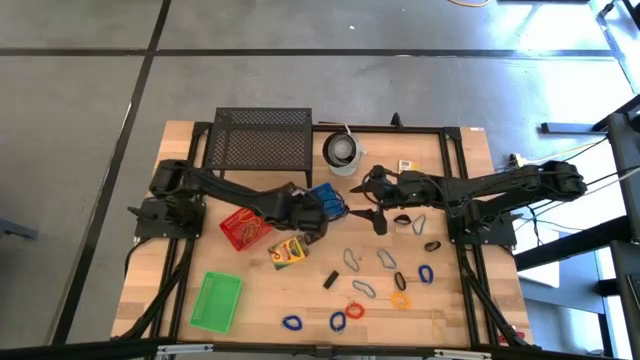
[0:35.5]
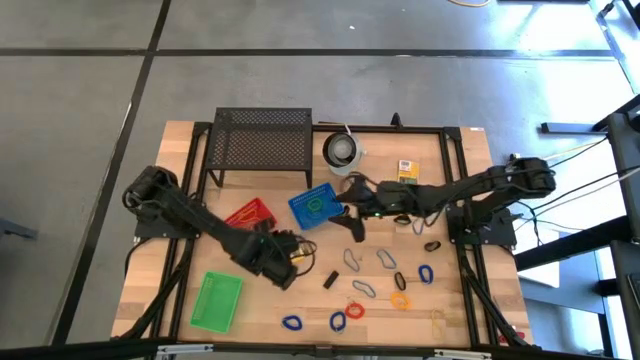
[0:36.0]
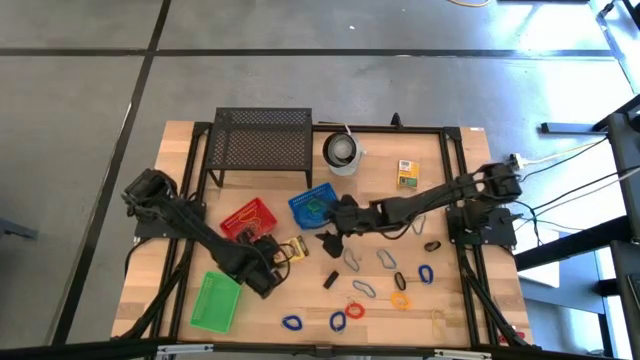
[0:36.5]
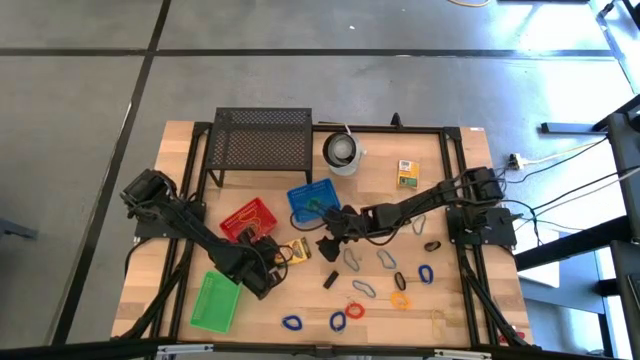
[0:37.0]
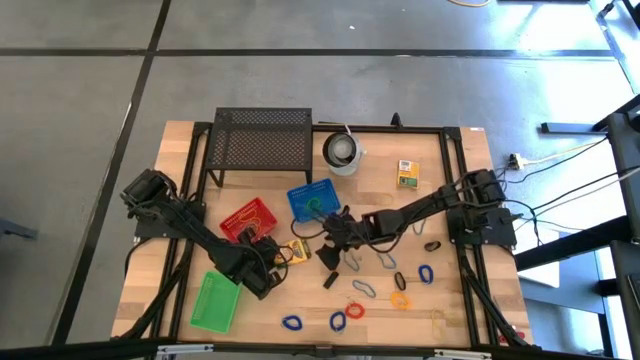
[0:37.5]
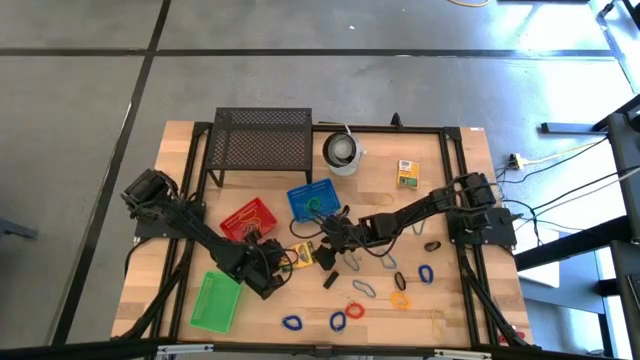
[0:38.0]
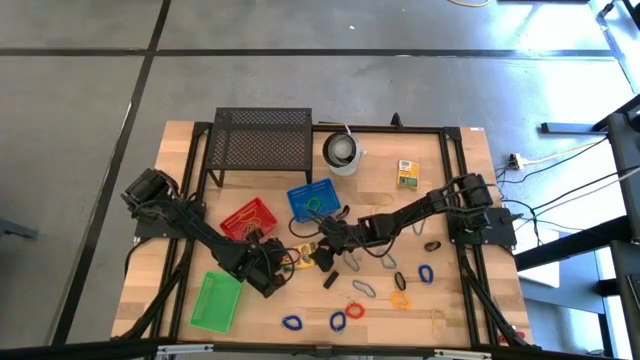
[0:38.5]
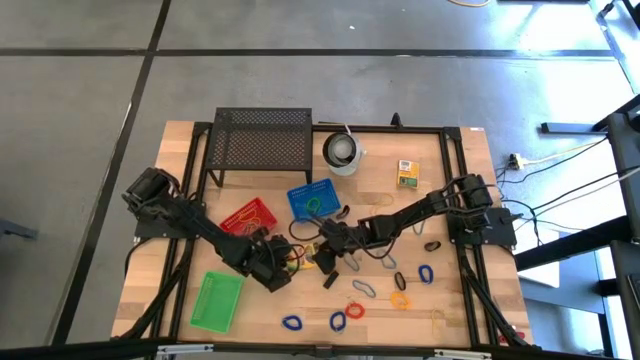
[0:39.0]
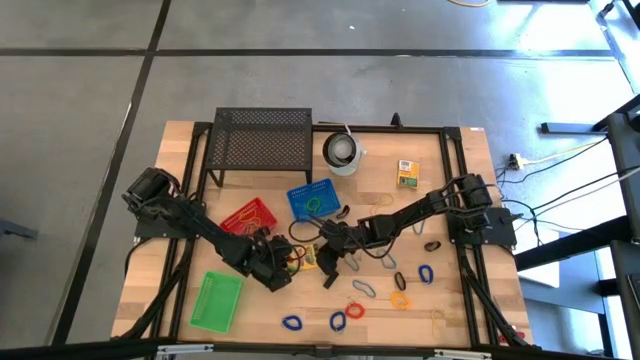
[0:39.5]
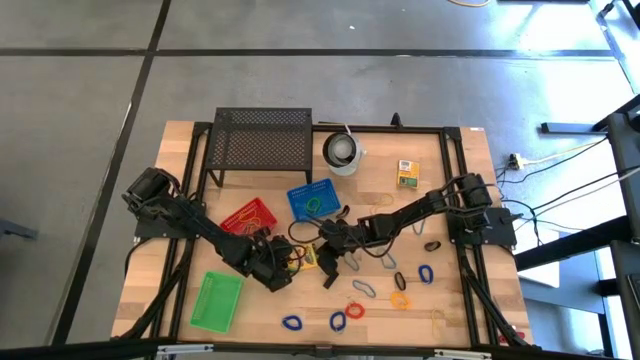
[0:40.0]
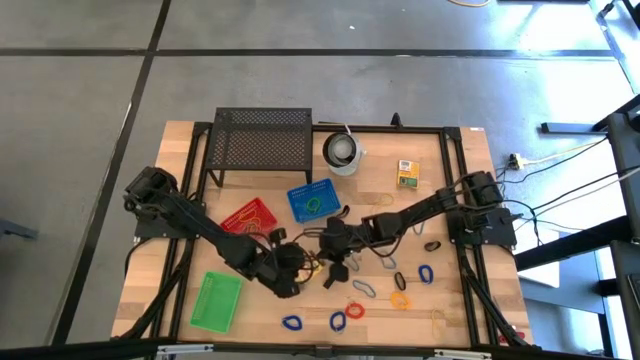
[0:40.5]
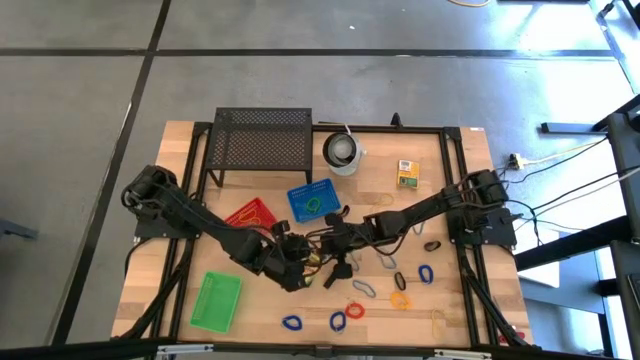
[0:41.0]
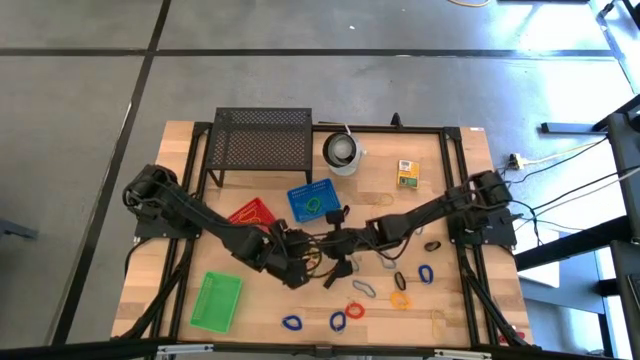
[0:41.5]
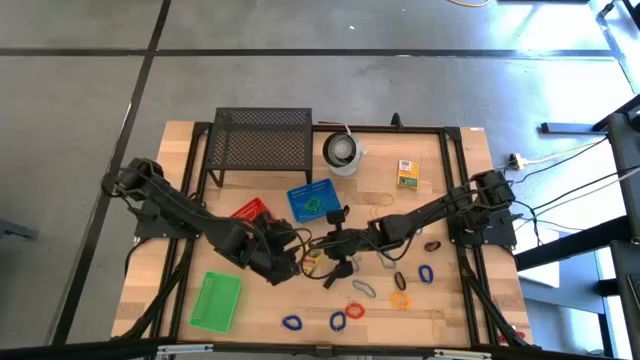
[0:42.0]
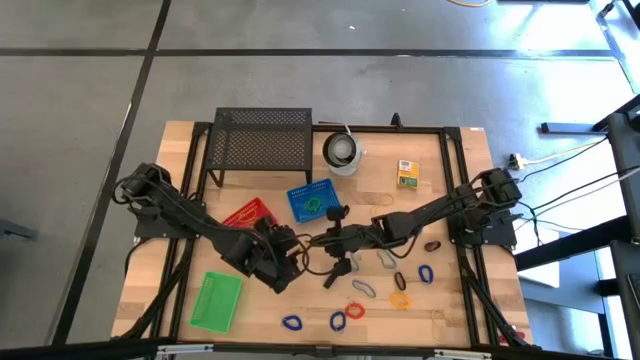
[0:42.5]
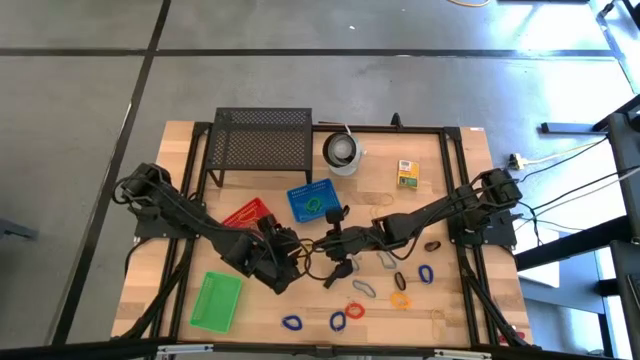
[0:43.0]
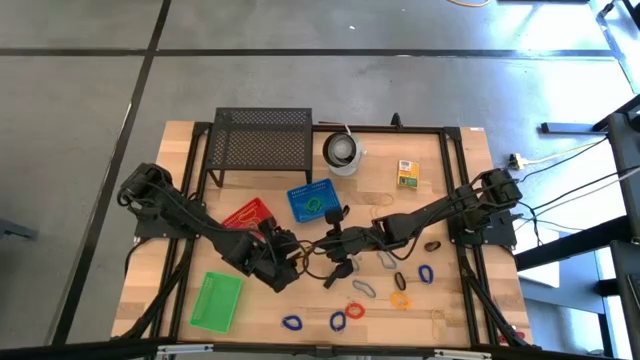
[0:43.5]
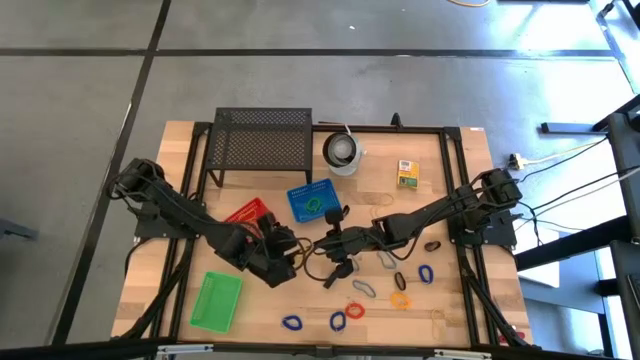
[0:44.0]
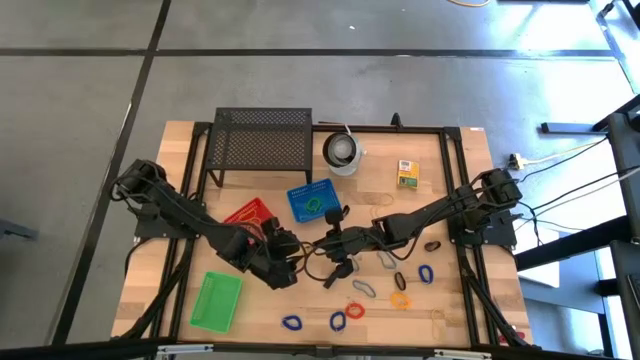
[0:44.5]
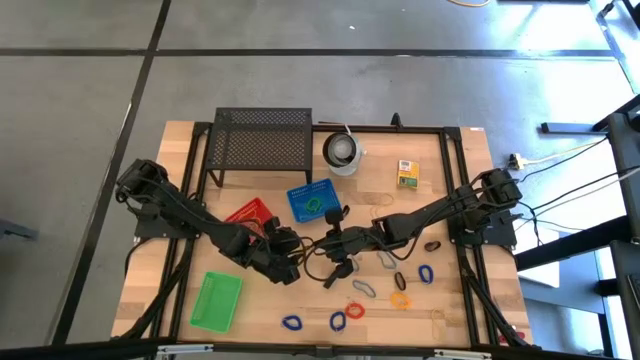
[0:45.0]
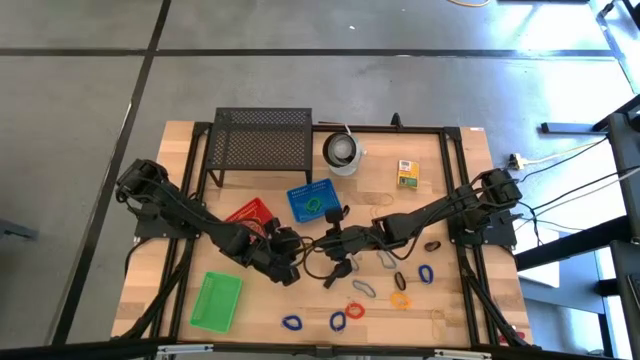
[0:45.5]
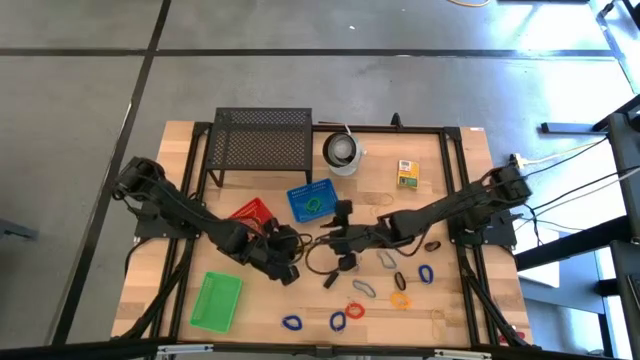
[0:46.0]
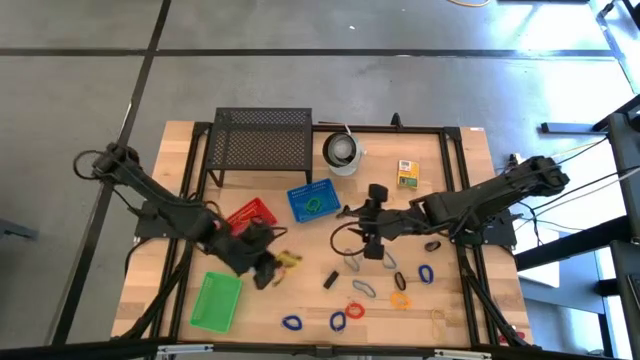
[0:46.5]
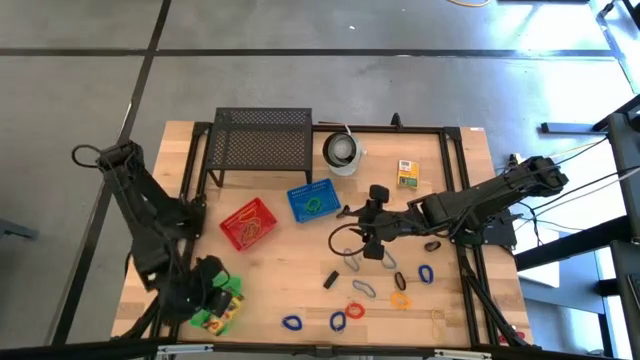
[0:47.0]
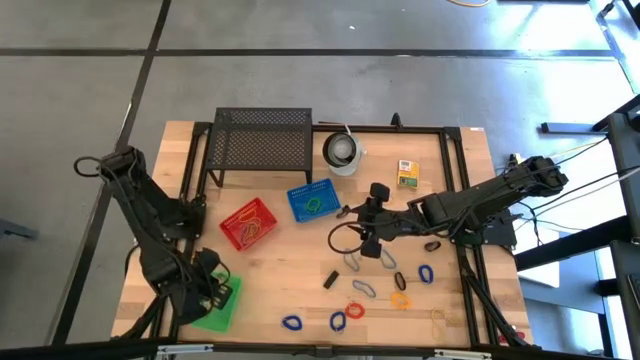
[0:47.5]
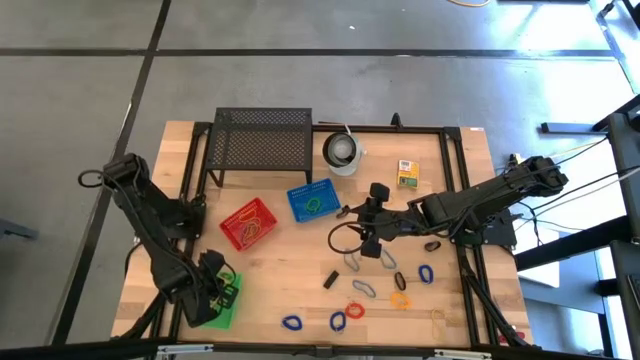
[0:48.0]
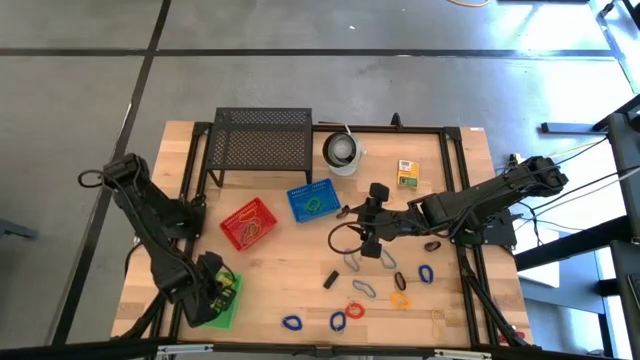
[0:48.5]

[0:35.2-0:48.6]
Task: Pick & Place Office Desk Supplies
Put the crayon box into the green bin

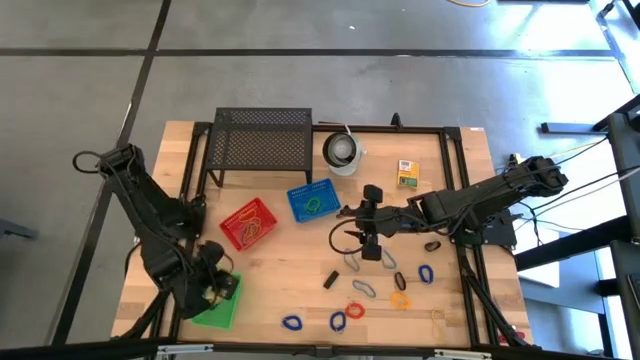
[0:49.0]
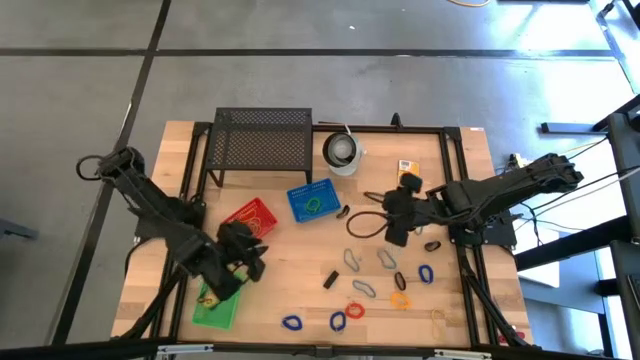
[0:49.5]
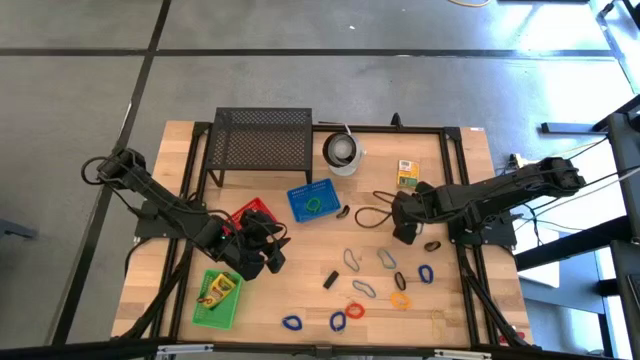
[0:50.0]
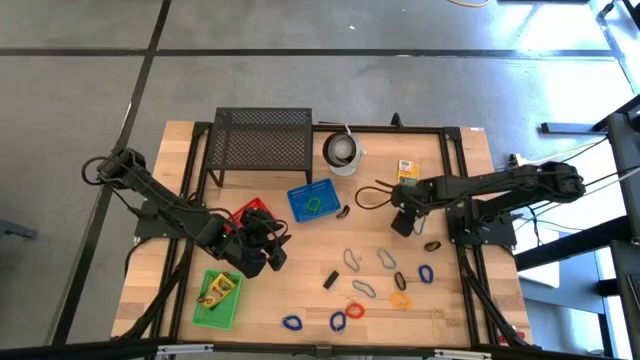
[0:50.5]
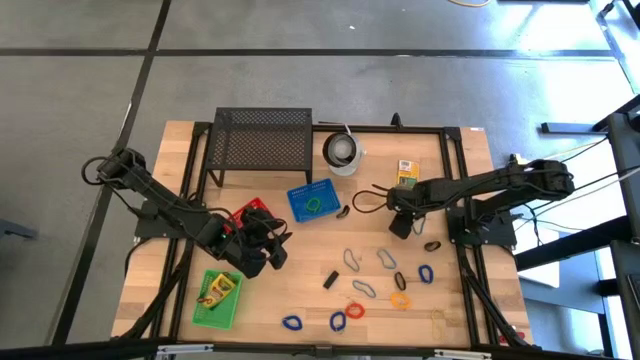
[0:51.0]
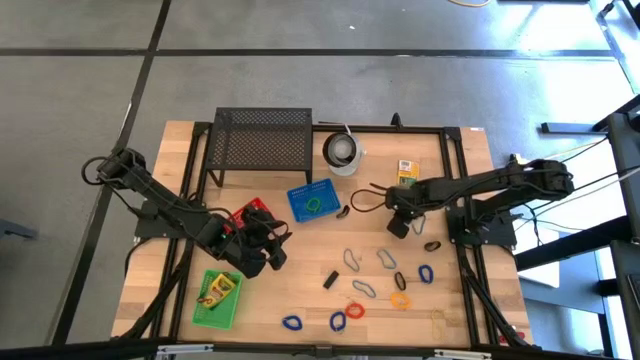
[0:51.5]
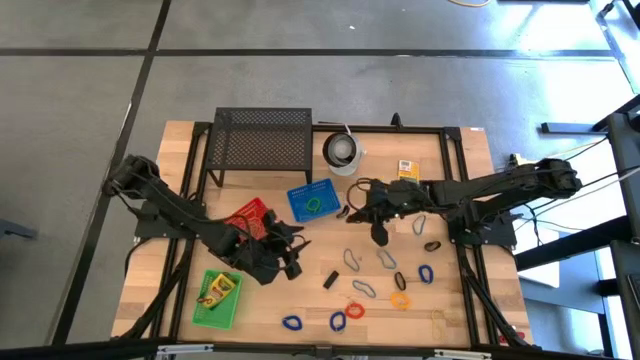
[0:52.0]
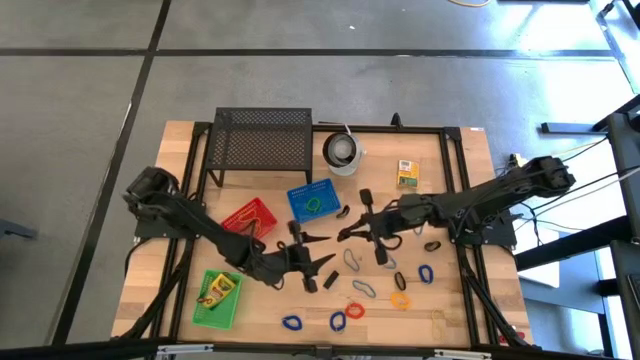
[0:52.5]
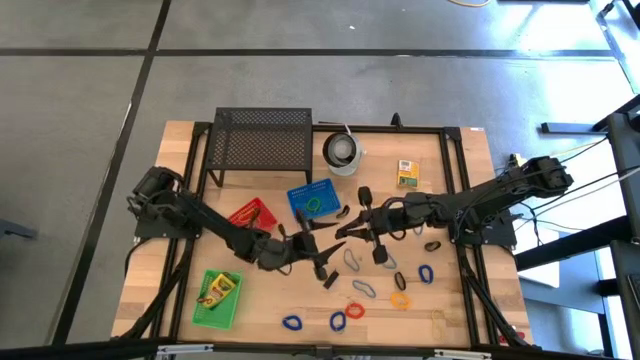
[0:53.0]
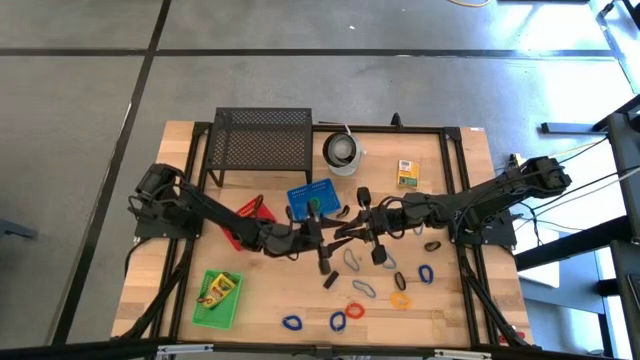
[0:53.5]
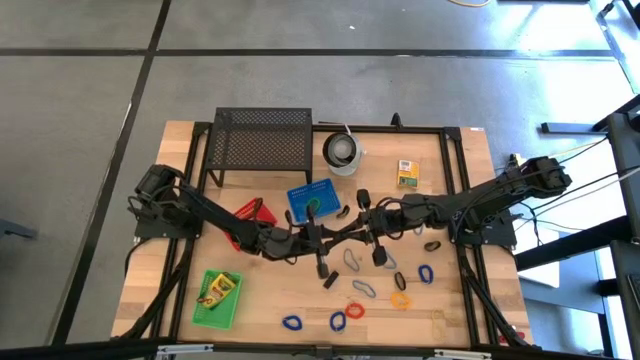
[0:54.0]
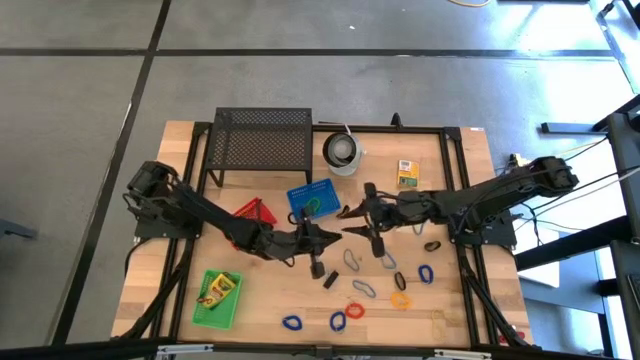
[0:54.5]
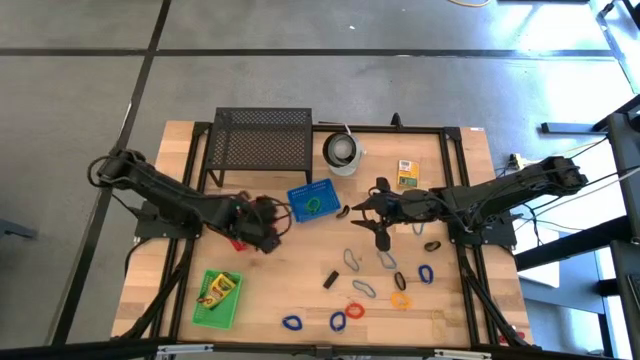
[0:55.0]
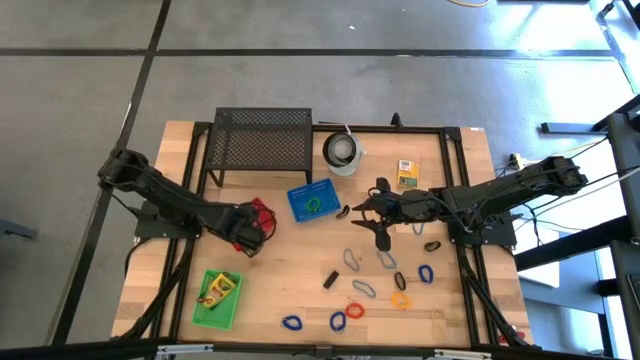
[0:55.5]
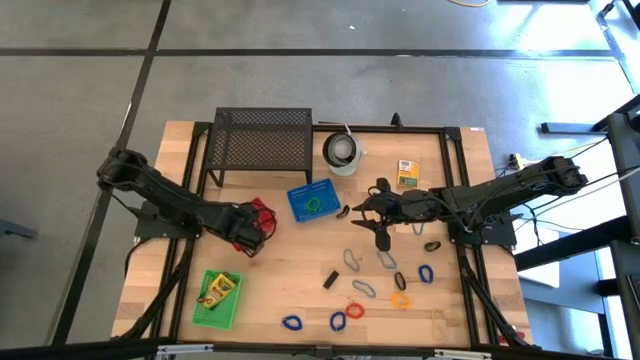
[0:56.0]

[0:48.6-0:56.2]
Put the black rubber band into the red bin

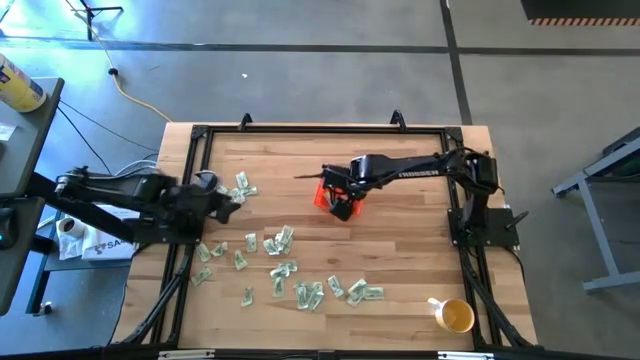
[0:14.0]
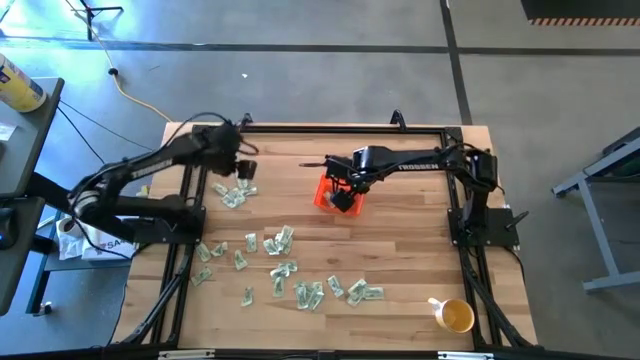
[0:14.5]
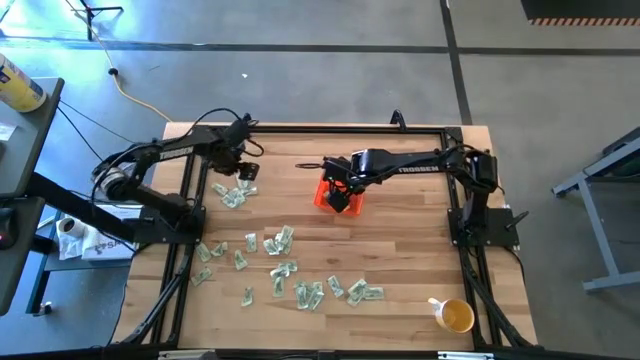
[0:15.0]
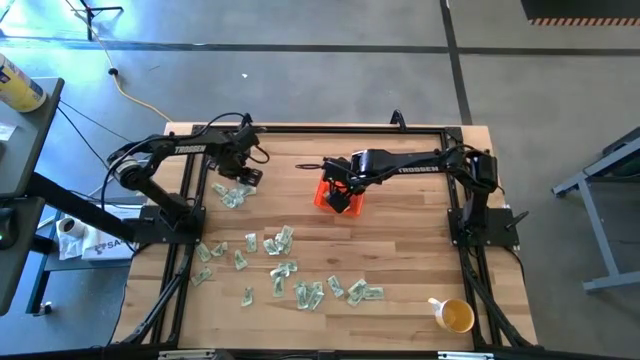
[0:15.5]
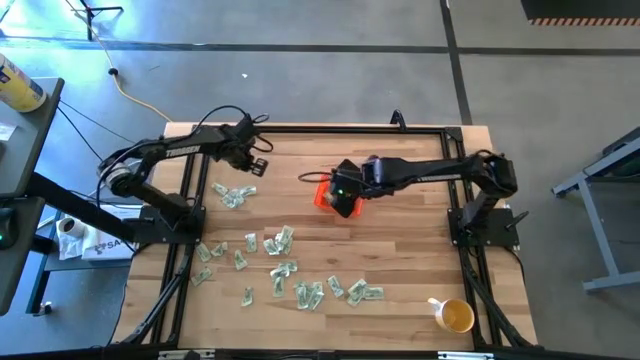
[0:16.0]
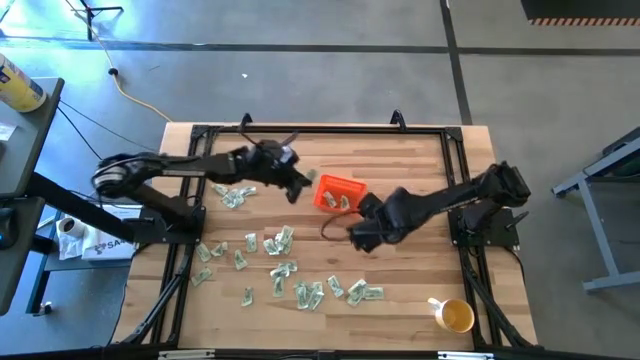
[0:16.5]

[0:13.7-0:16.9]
Task: Pick and place Stevia / Truvia into bins
Put the green stevia packet into the orange basket
